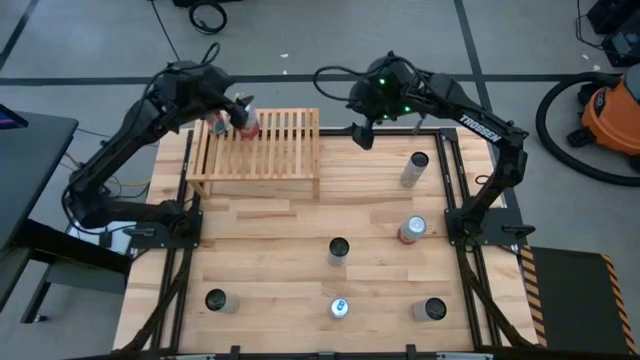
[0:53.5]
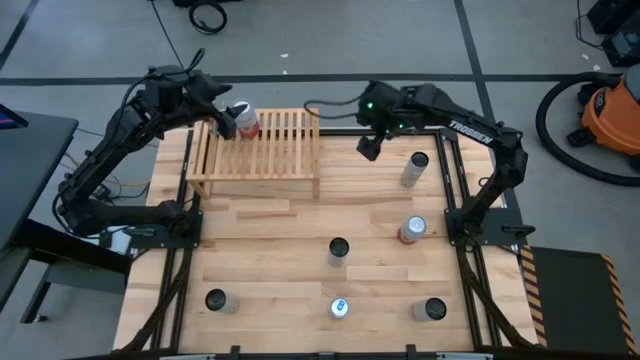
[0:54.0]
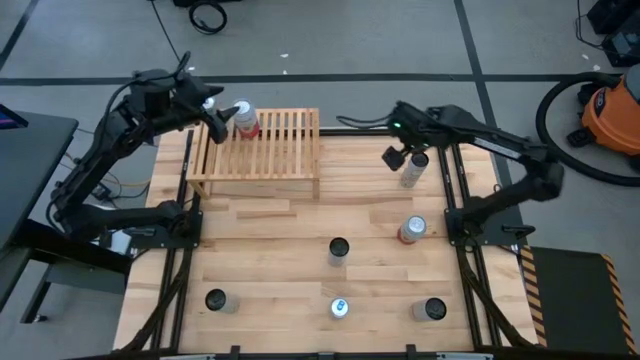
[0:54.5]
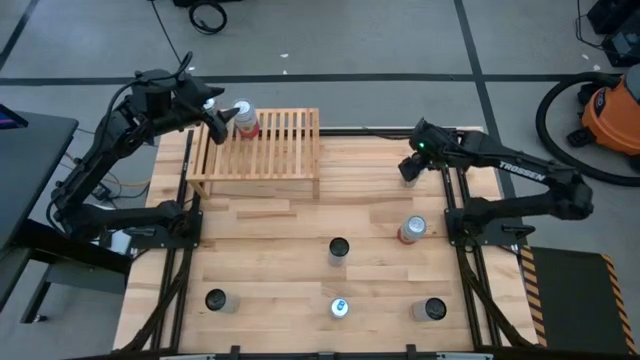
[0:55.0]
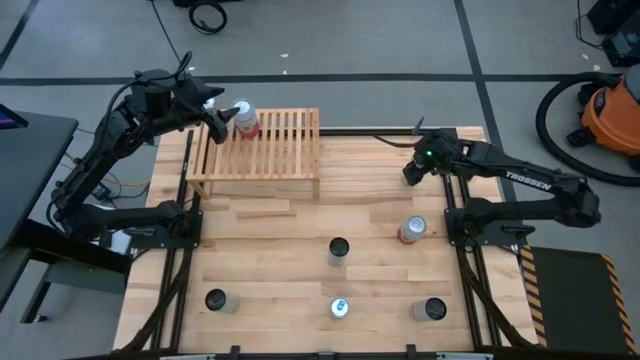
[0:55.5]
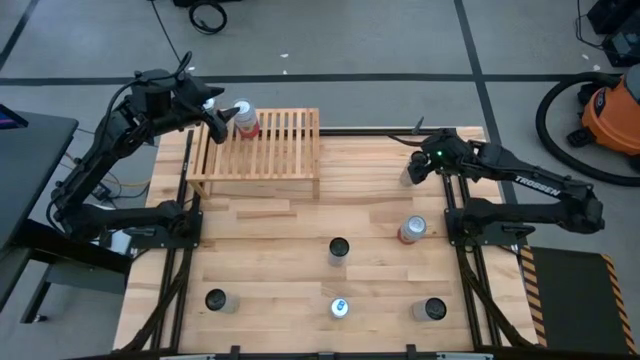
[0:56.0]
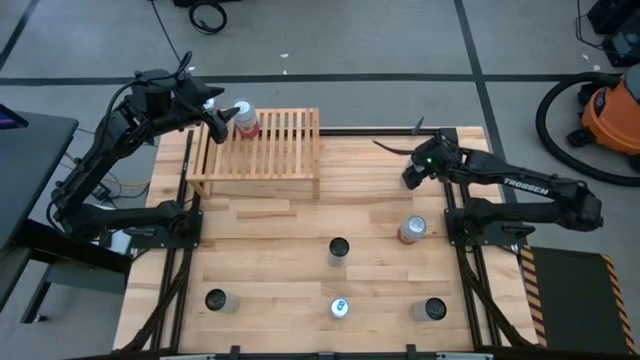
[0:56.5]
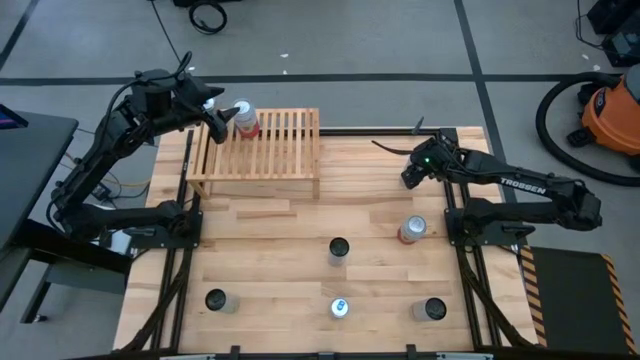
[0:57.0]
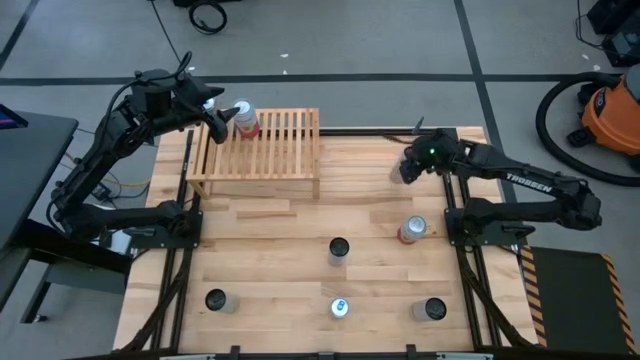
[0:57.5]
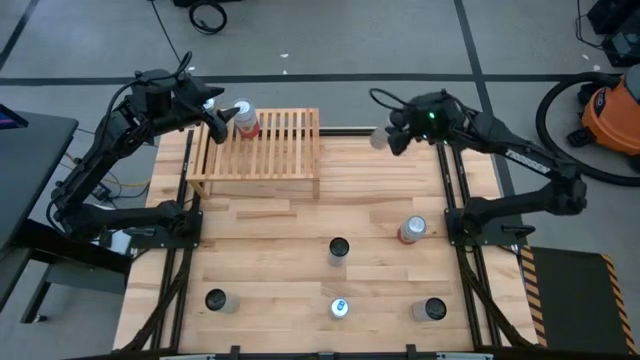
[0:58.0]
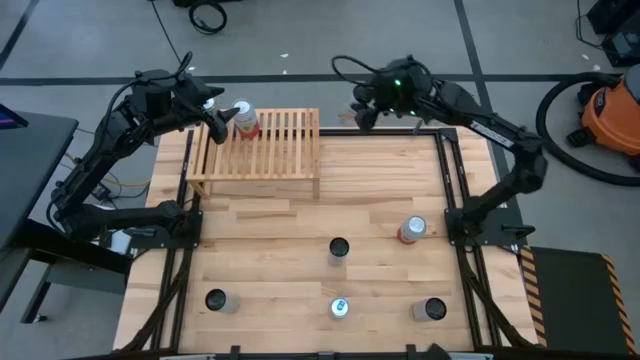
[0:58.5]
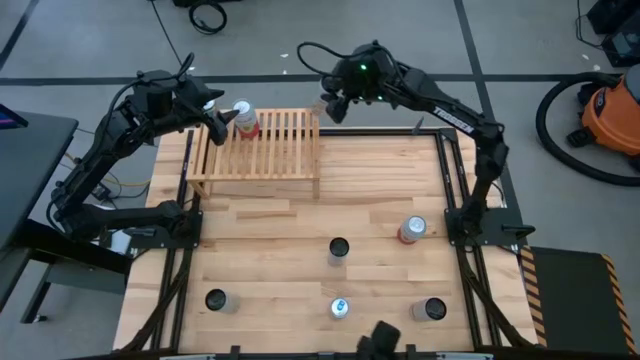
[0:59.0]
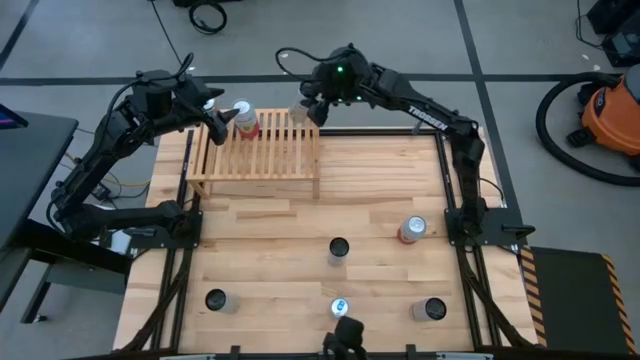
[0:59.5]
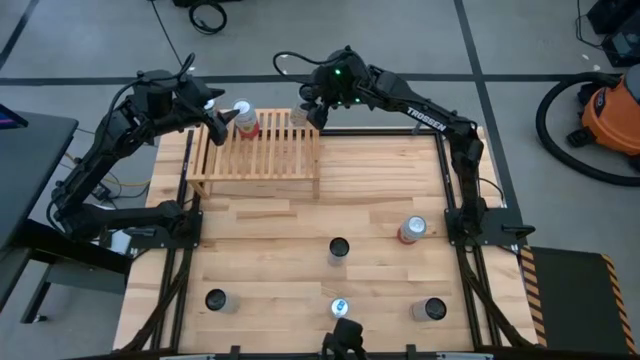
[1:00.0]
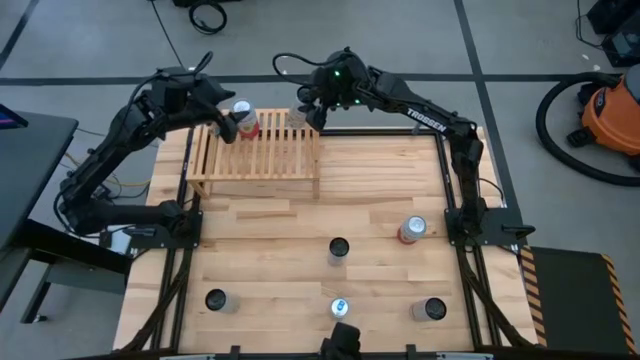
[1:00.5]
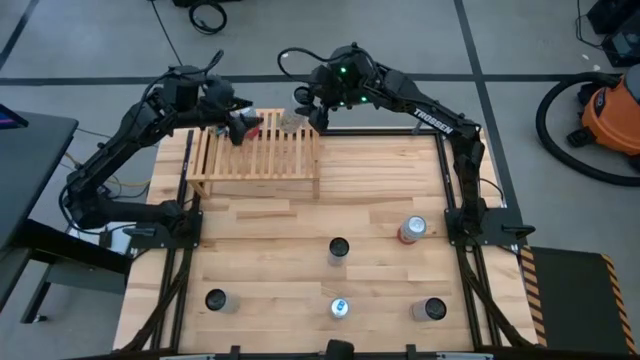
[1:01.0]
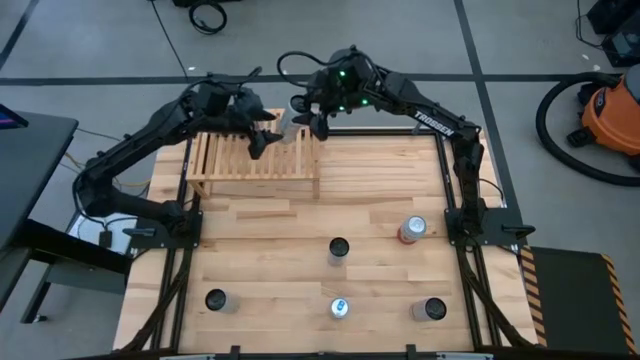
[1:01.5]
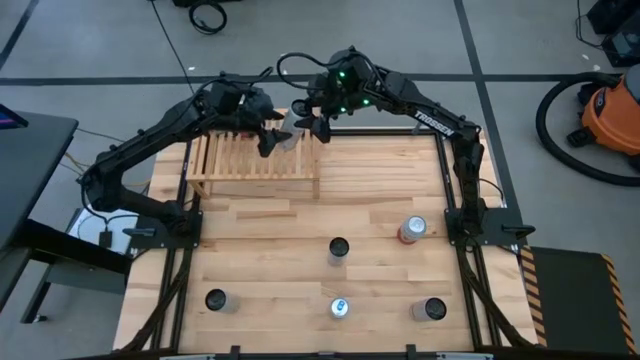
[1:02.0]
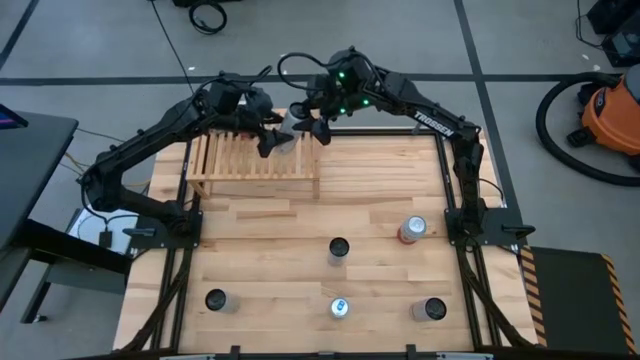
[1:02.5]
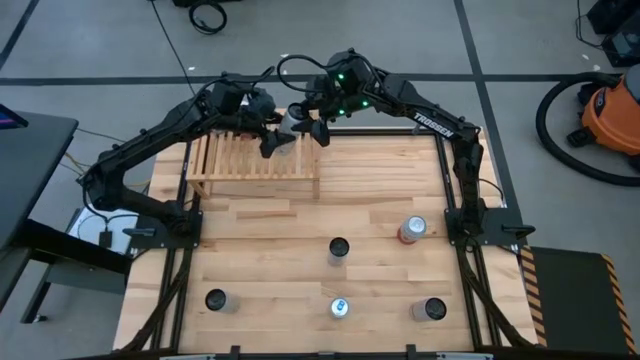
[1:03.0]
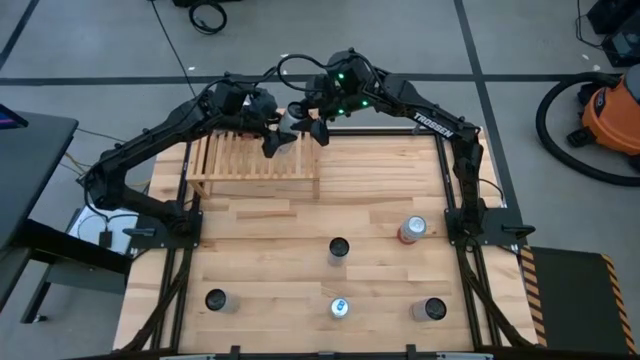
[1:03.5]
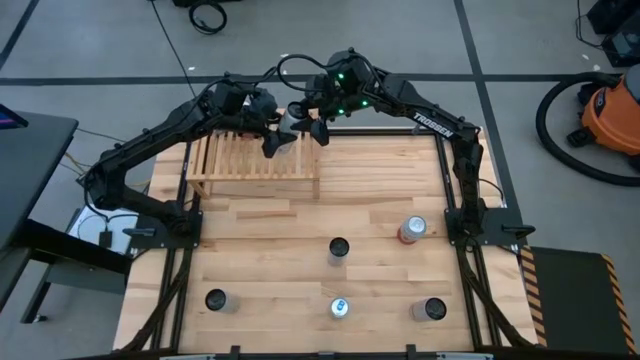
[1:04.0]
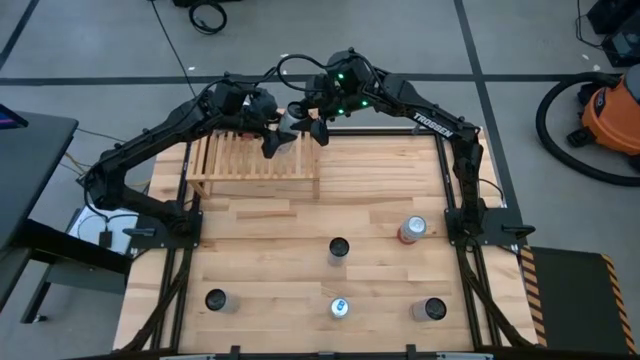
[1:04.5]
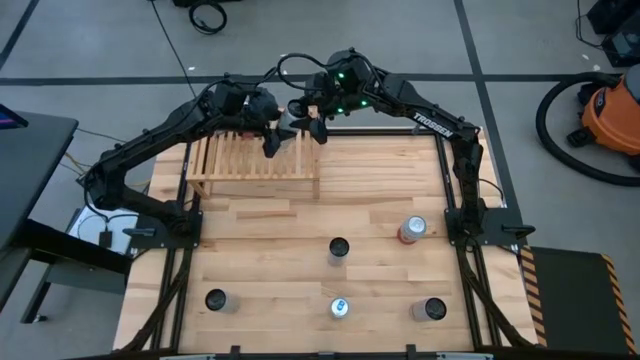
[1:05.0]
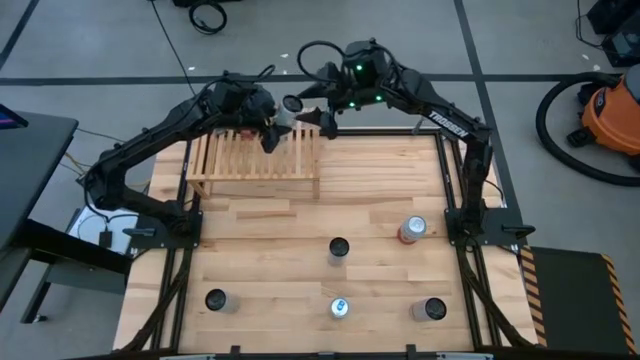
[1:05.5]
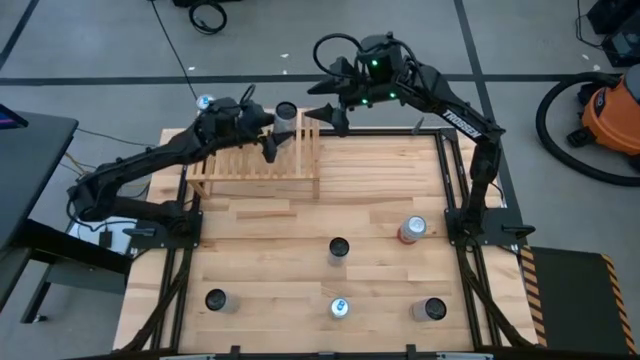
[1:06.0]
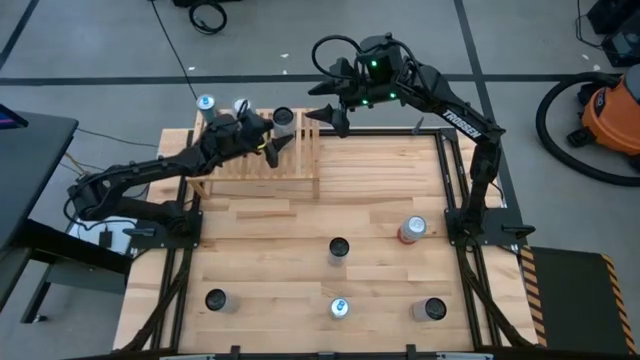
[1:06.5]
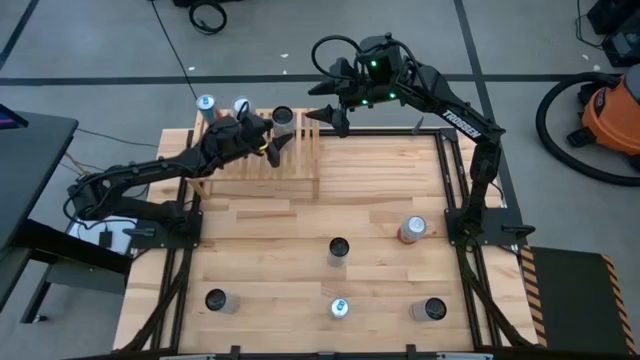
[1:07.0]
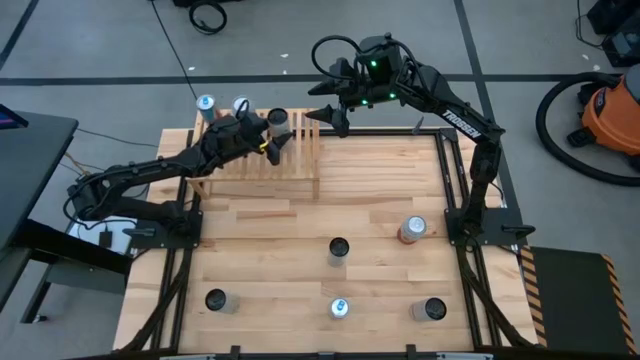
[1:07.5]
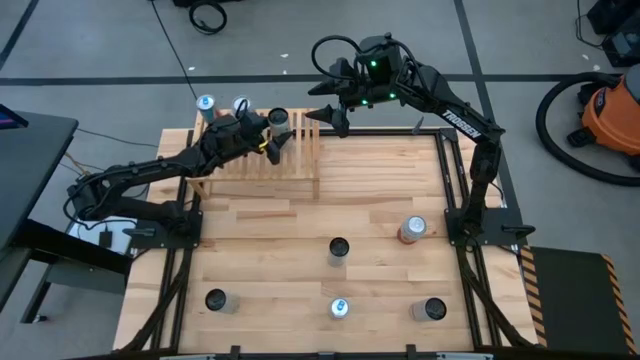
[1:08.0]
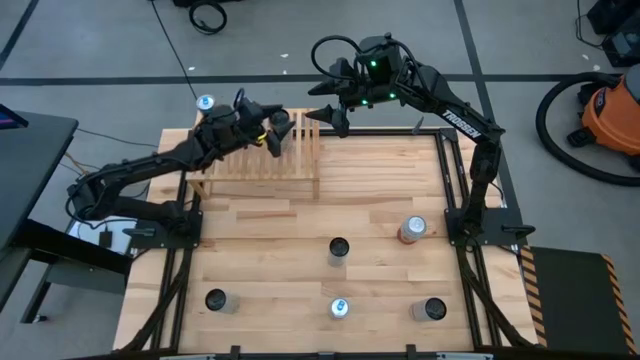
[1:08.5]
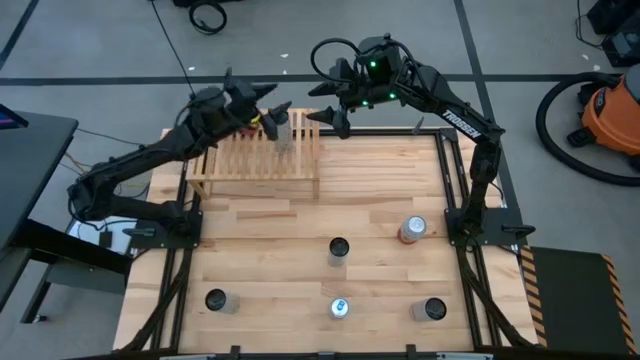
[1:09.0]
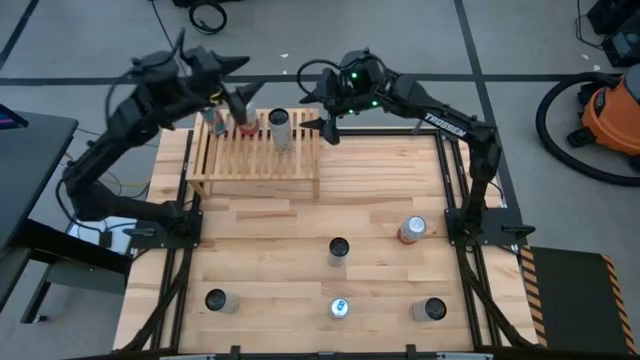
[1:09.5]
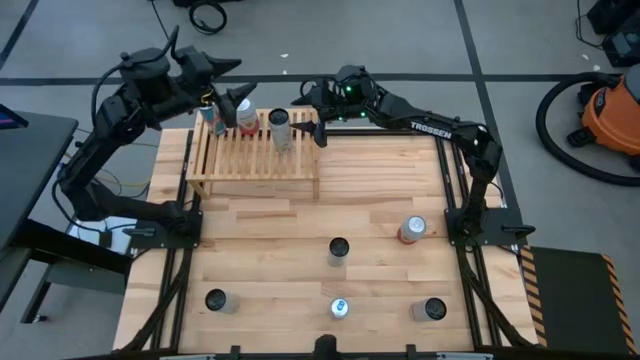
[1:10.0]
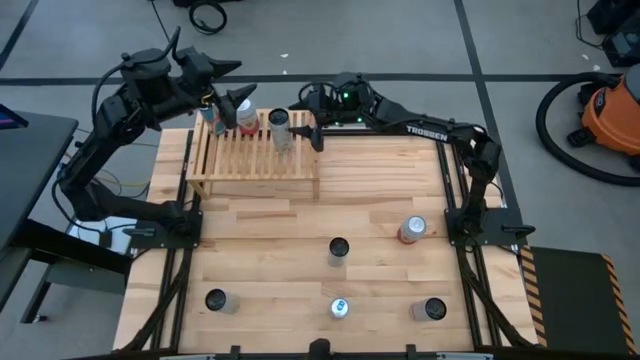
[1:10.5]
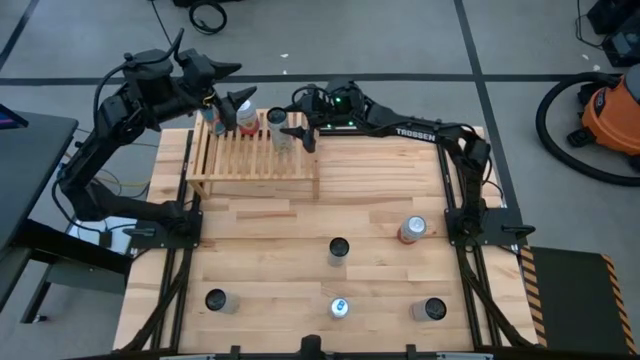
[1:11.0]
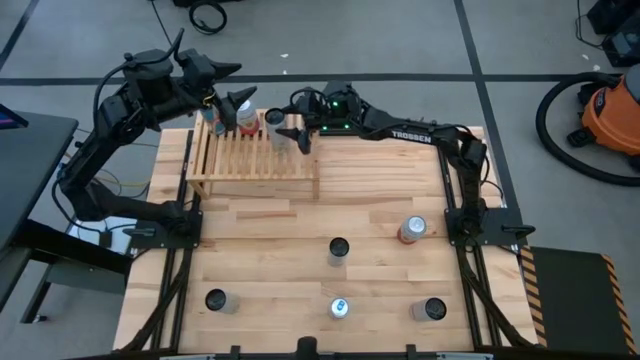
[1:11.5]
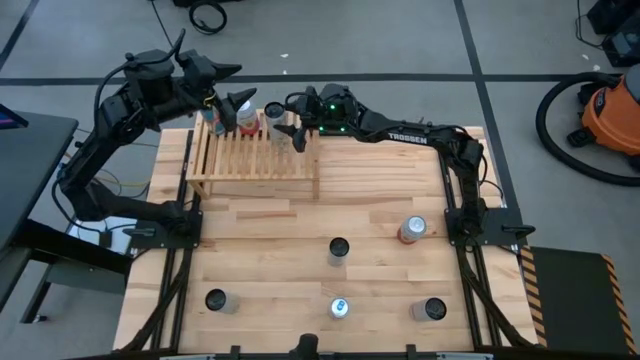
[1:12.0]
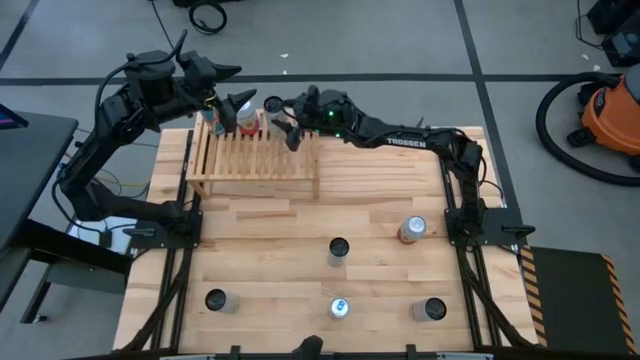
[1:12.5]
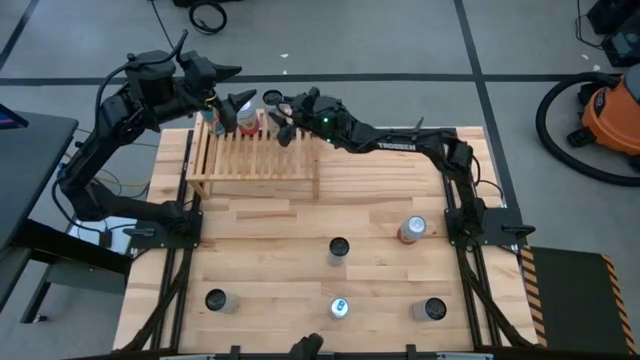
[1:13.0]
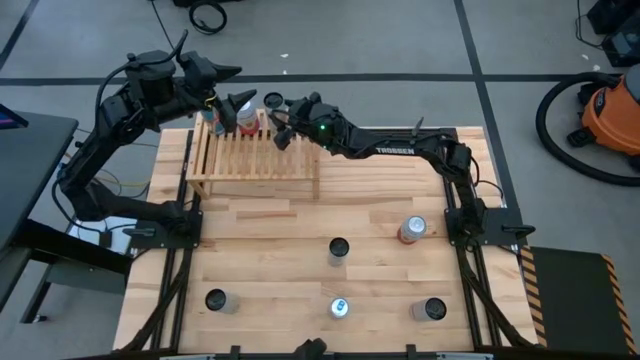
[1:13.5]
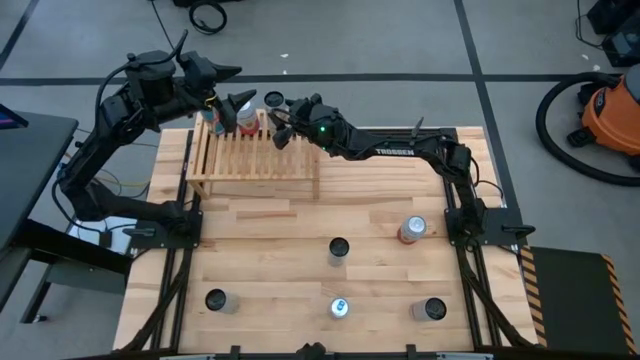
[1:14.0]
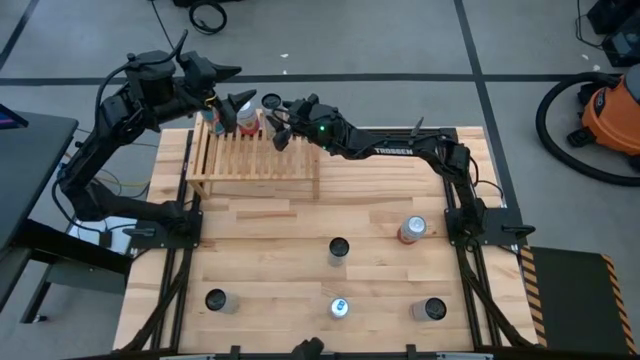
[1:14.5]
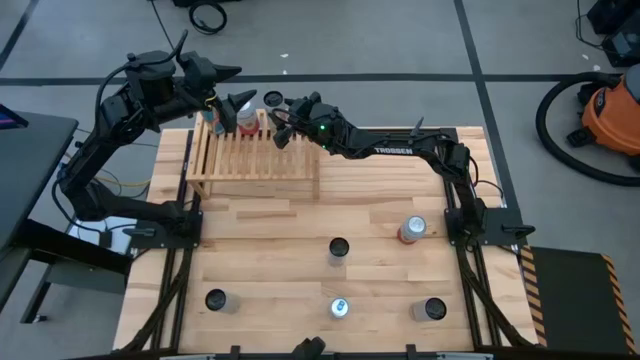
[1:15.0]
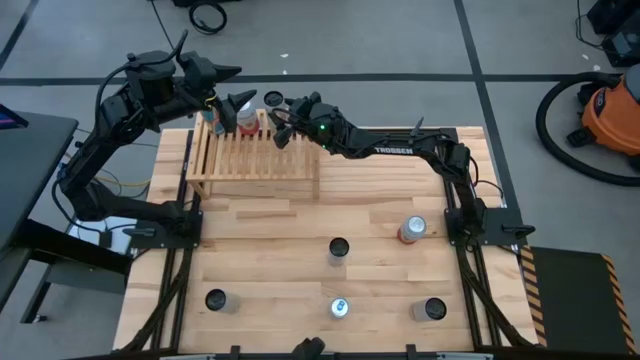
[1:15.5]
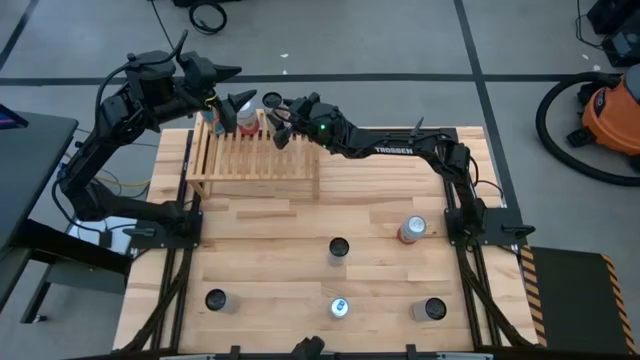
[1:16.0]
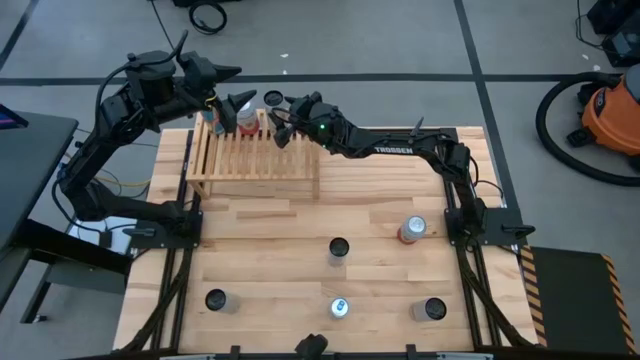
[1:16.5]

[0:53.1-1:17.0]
Task: Place canned beverage on shelf
Put the top white and yellow soda can on the shelf aligned with the pink and white soda can
